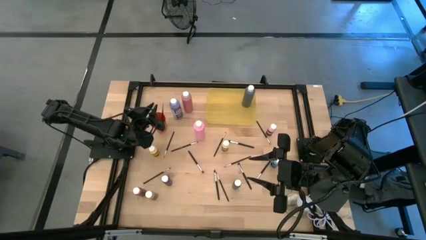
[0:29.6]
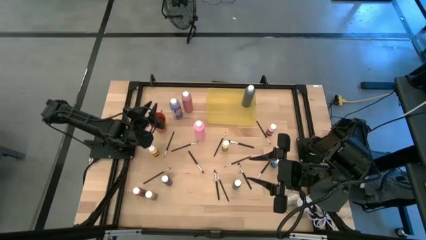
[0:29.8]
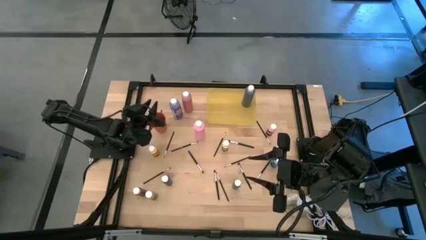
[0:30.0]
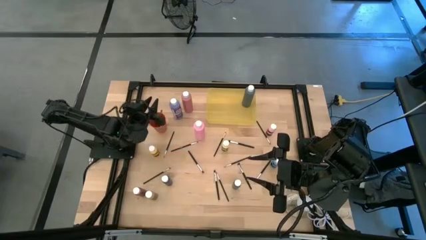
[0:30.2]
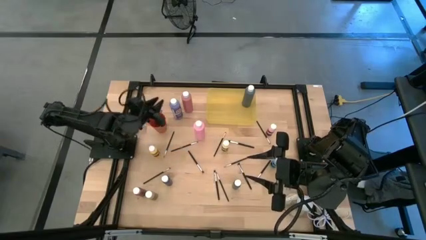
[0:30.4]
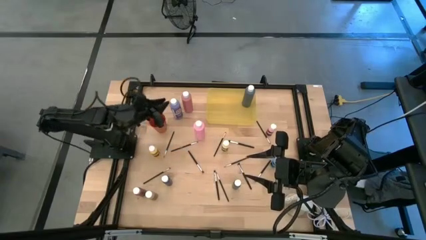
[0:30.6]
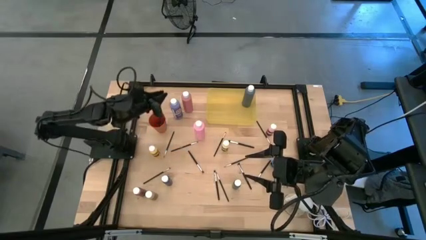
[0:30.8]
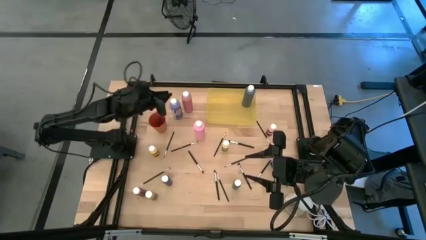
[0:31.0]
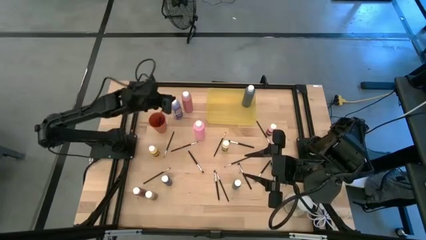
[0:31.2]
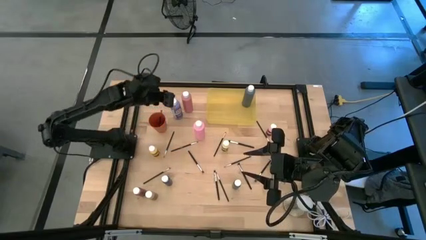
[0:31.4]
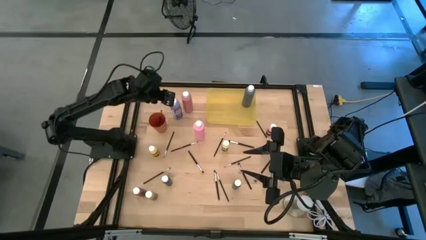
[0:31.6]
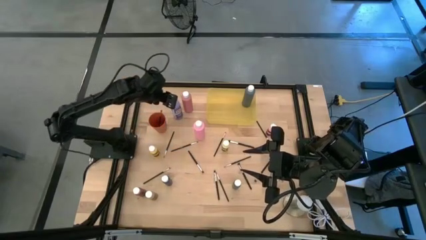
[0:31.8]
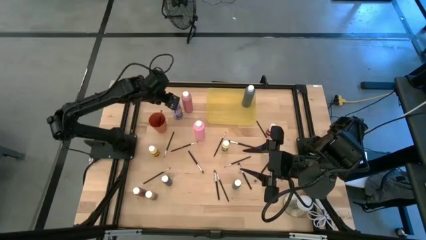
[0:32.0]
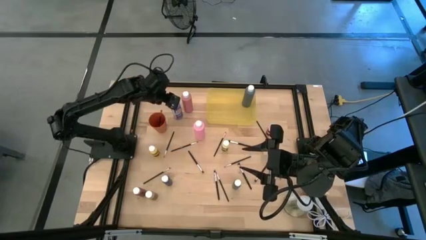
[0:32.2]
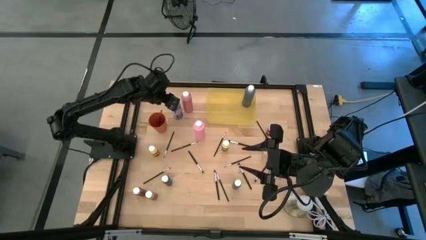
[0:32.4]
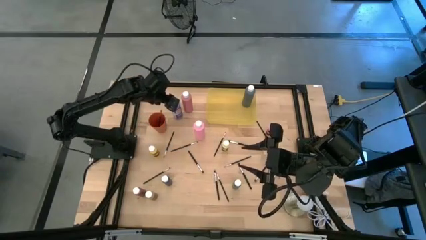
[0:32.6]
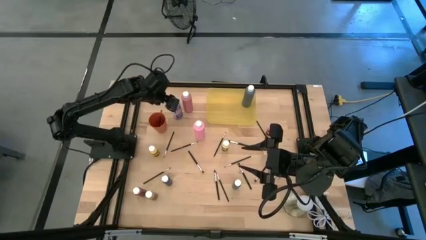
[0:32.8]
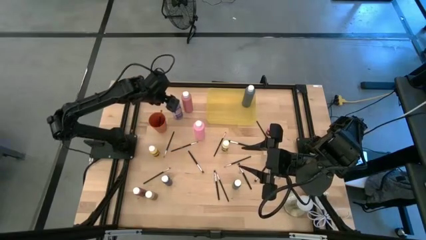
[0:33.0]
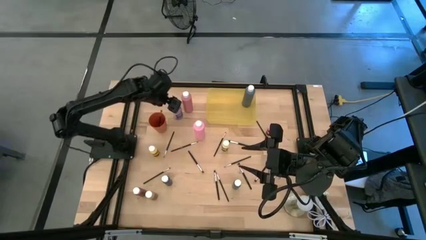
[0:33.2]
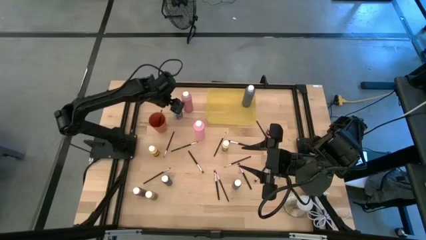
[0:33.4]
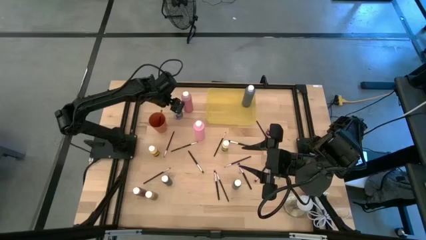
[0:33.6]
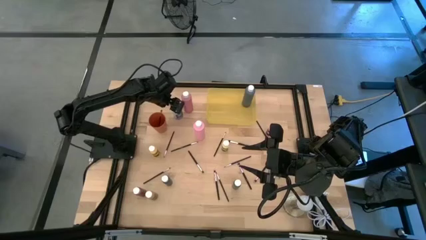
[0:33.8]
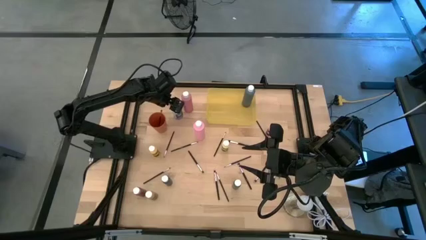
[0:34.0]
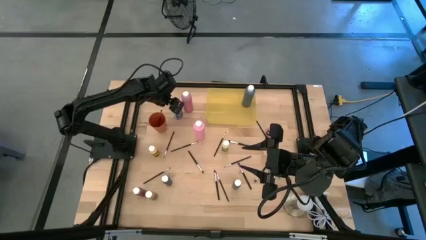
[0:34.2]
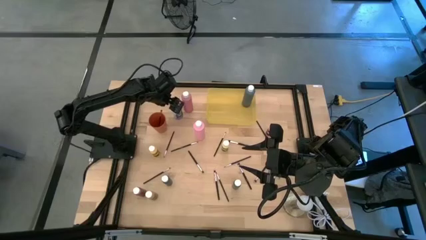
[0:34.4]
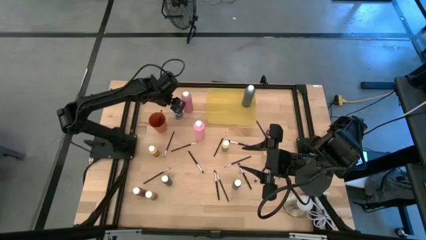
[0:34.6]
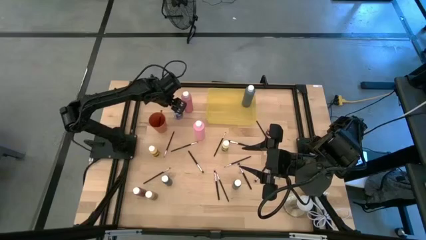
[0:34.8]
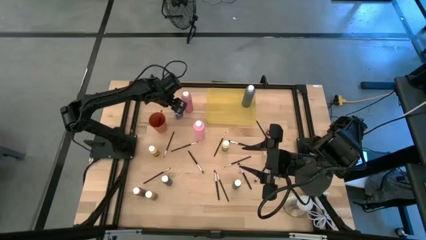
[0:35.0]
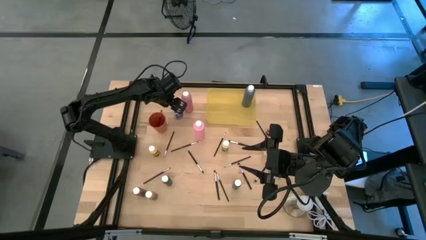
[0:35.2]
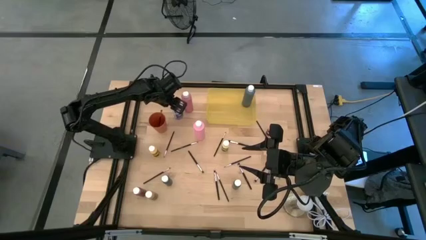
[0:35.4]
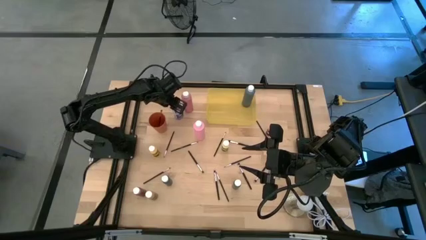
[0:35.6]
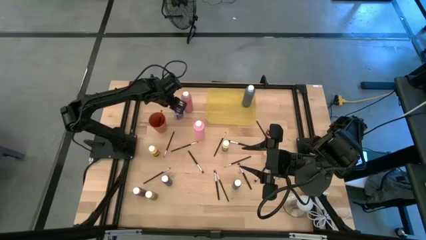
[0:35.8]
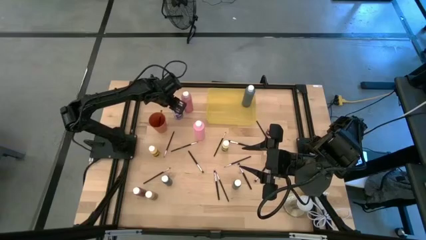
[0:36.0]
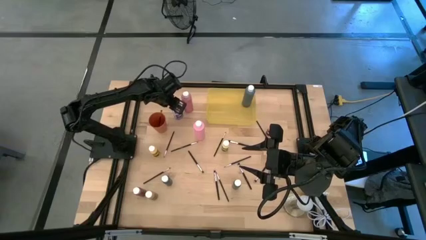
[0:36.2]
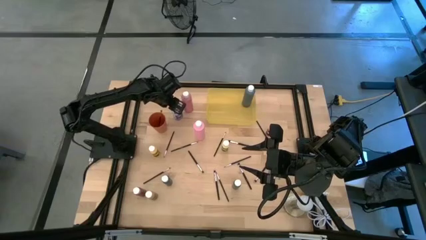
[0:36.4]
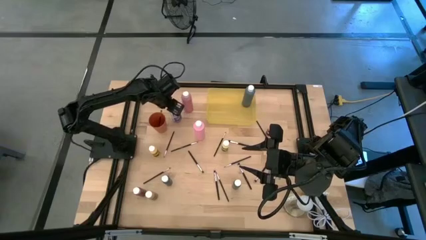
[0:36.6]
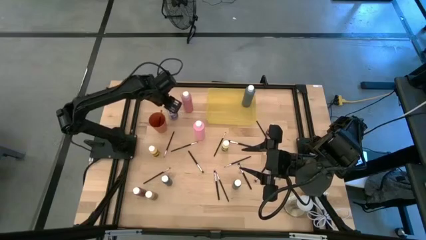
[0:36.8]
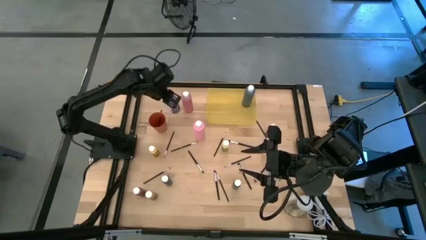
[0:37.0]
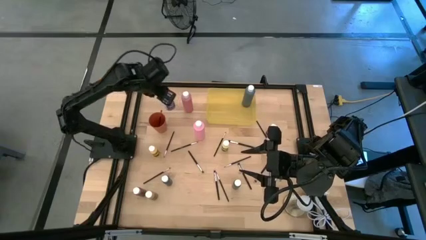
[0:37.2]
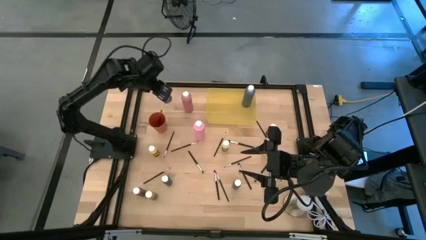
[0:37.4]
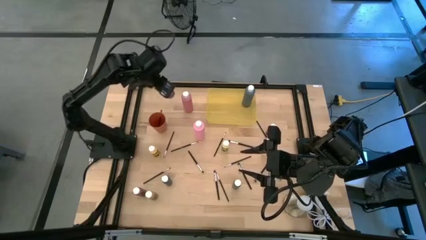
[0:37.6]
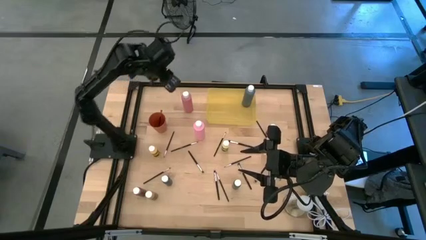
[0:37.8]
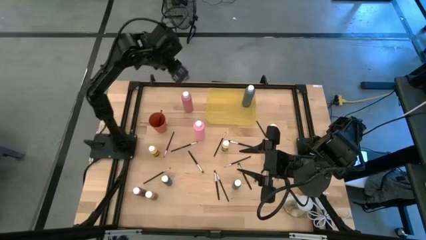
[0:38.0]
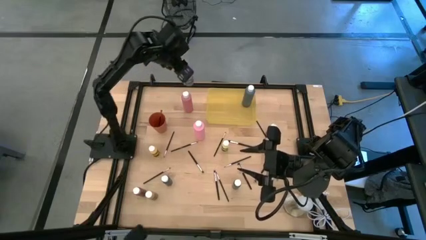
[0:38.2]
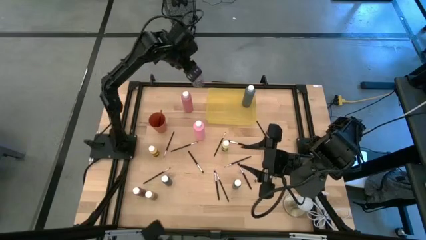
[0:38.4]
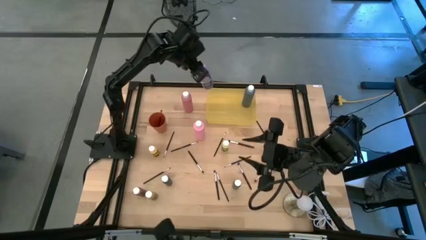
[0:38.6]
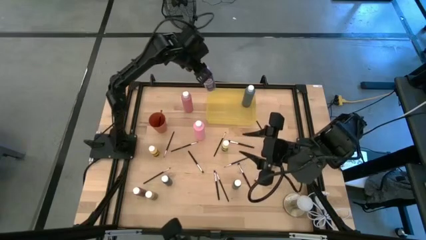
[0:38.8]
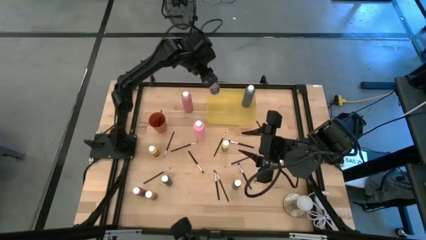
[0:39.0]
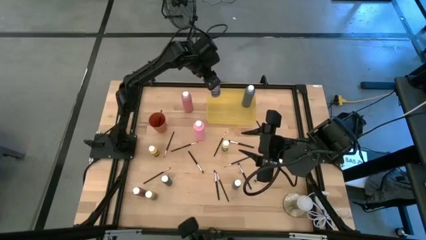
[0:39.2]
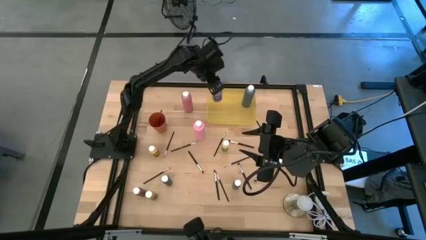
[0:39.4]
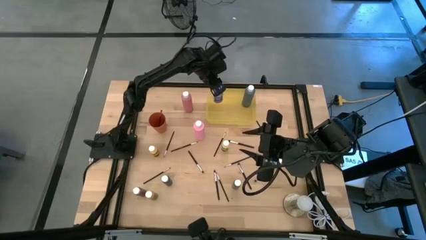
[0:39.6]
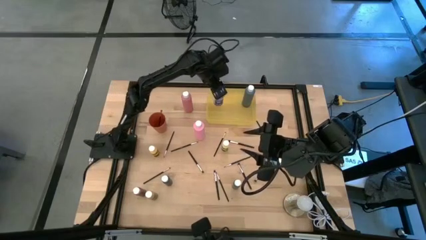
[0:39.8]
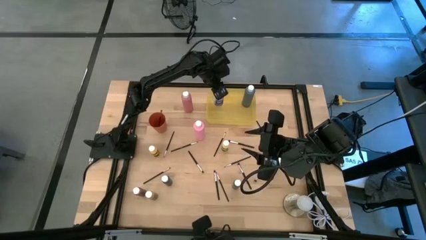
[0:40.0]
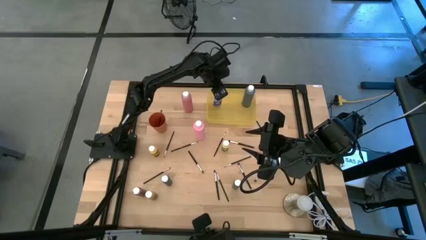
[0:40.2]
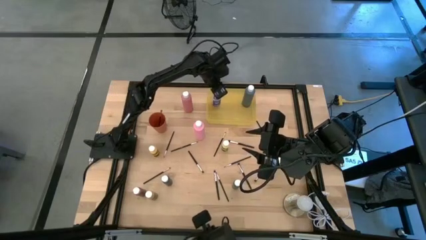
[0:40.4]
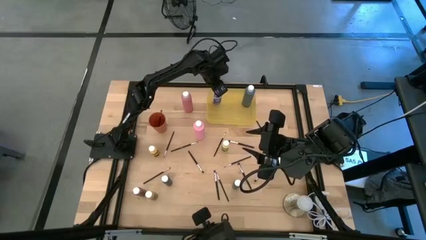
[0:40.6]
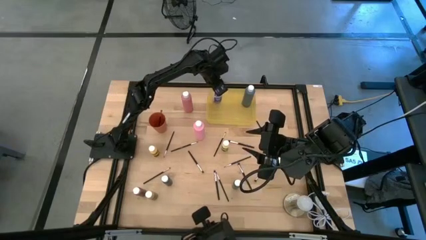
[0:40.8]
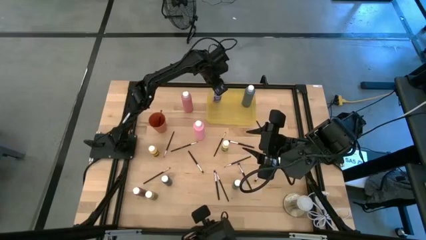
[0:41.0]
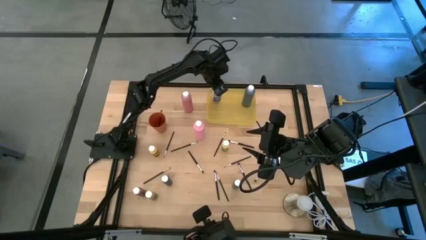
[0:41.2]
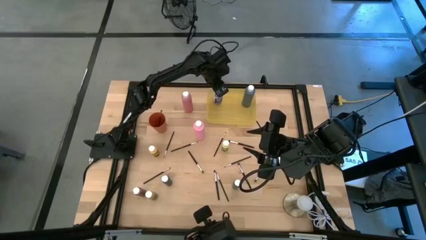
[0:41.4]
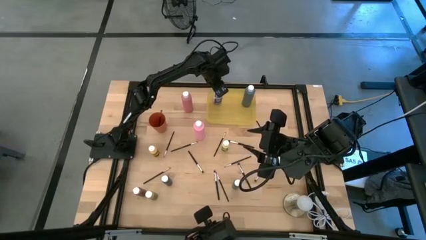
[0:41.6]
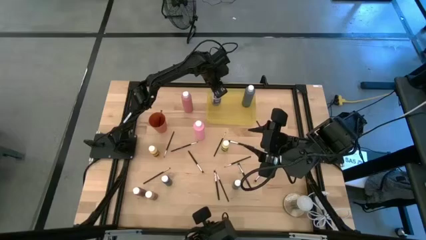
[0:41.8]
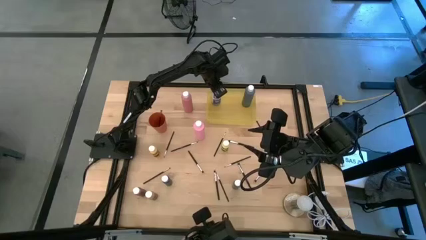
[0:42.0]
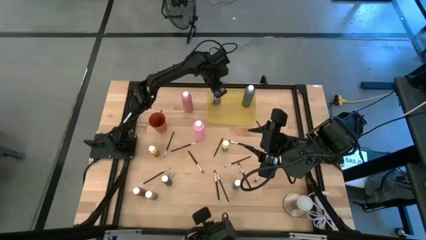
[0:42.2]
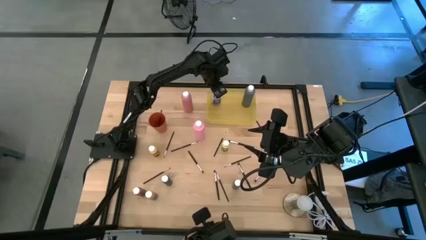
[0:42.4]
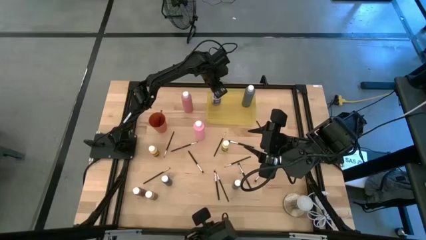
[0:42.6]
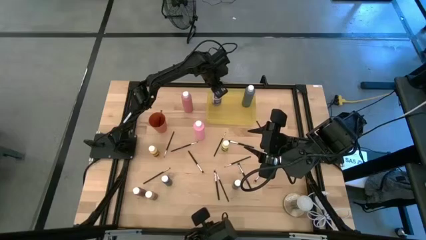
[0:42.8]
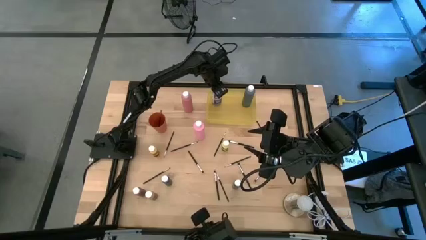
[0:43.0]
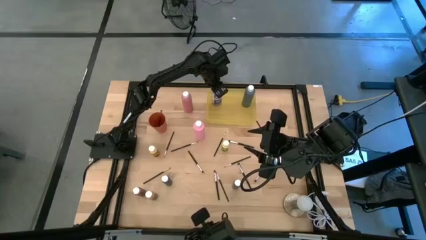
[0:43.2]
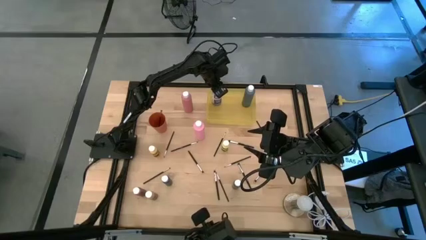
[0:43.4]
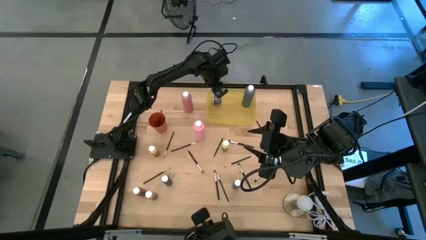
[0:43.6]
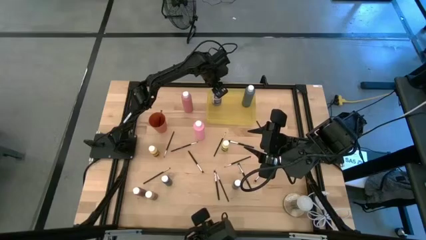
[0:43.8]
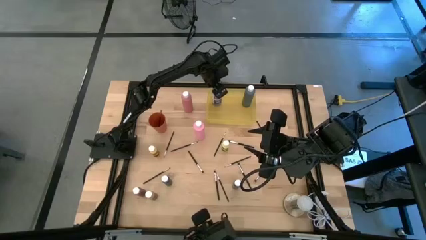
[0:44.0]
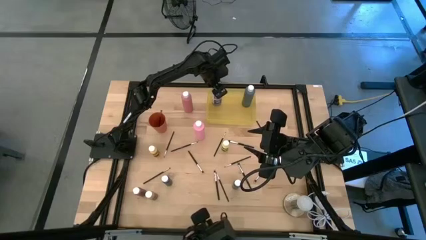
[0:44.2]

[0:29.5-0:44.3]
Task: Pick & Place Paint Supplies
Put the large purple paint bottle into the yellow bin

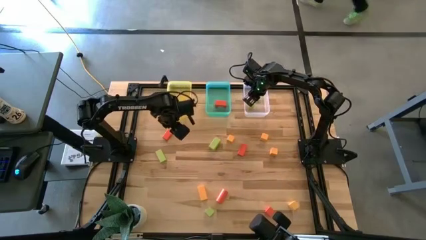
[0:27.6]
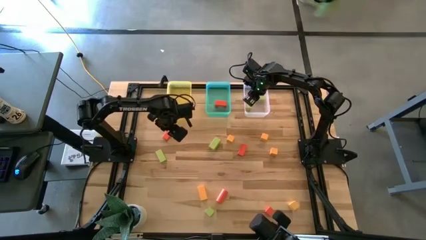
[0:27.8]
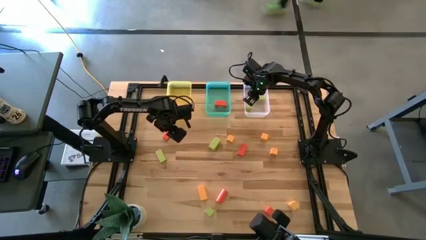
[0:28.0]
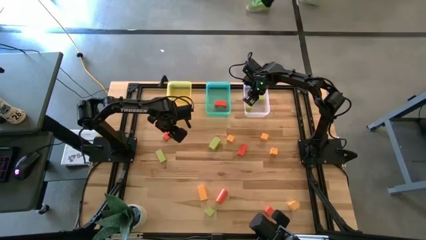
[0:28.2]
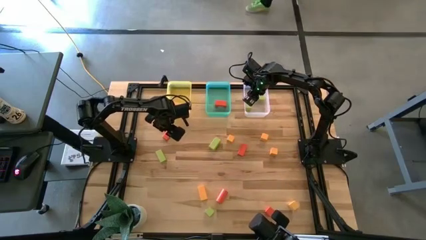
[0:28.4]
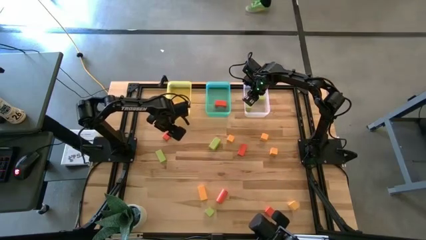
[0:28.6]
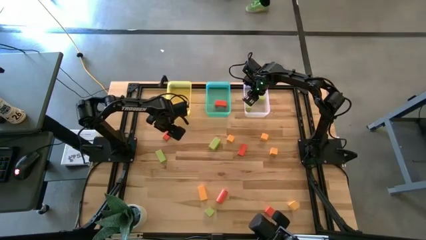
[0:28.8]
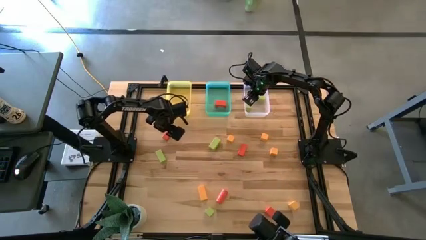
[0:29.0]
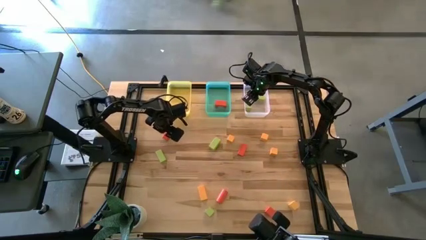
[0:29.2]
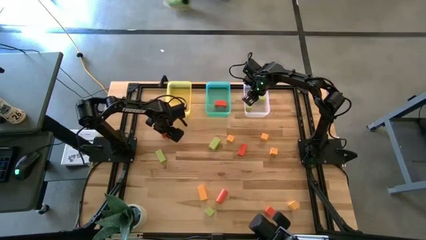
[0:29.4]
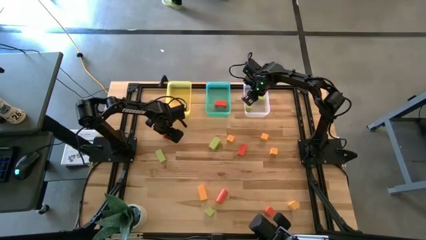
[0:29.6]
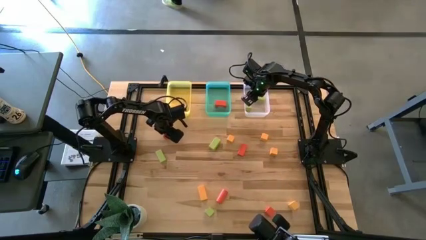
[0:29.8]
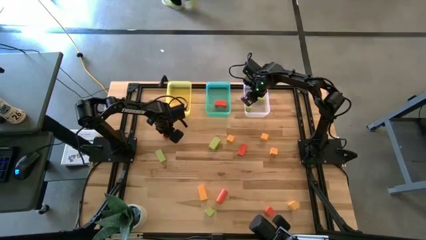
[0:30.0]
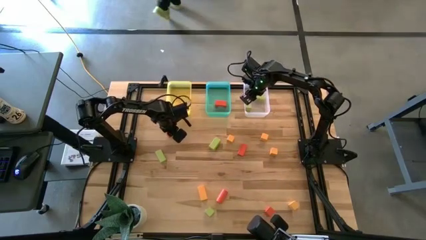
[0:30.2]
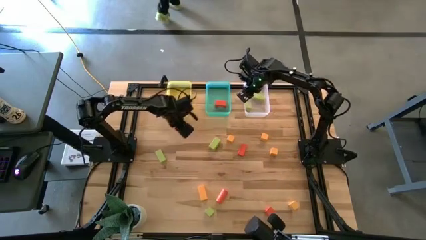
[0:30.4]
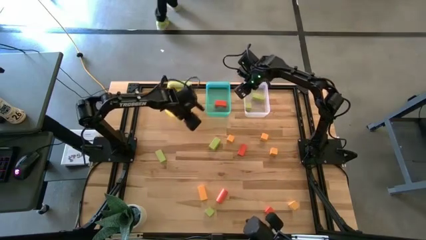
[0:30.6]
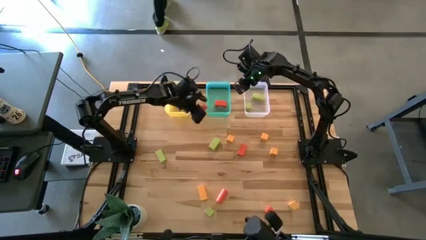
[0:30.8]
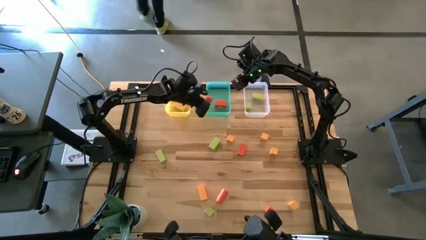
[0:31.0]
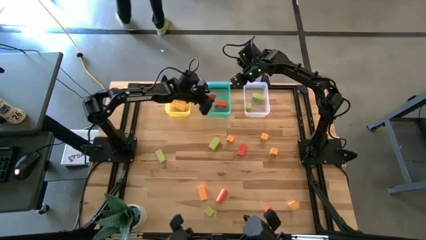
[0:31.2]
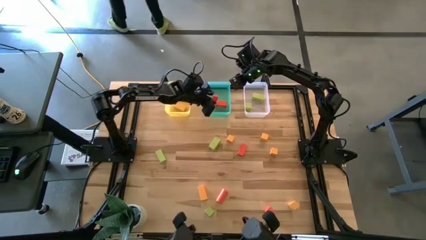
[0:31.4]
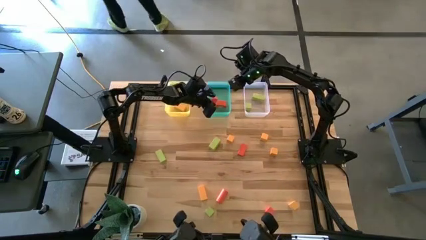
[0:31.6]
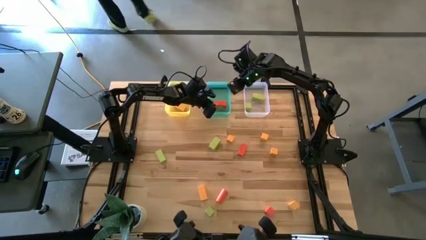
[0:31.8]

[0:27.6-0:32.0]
Task: Sort & place blocks by color
Put the orange block into the green bin
